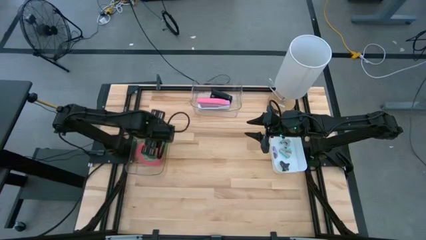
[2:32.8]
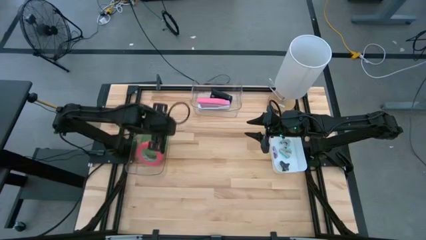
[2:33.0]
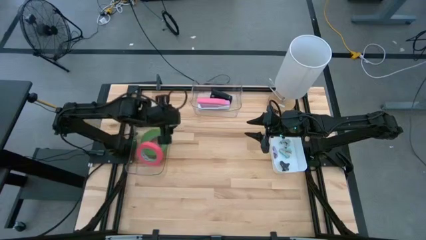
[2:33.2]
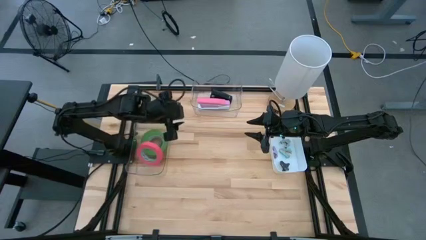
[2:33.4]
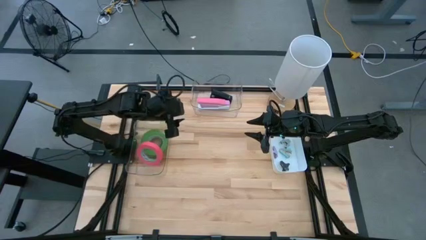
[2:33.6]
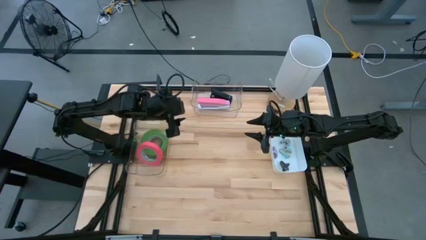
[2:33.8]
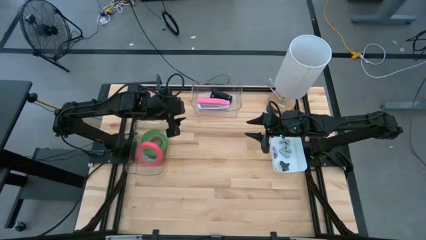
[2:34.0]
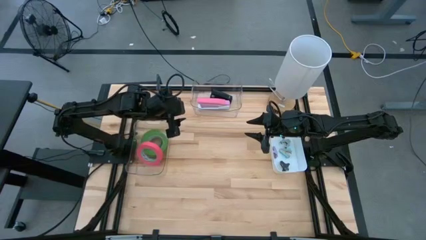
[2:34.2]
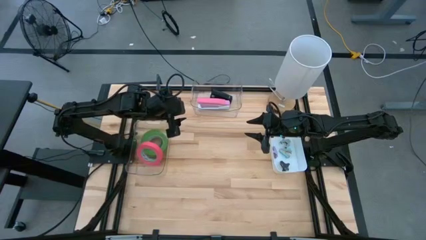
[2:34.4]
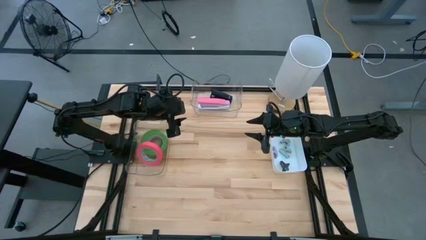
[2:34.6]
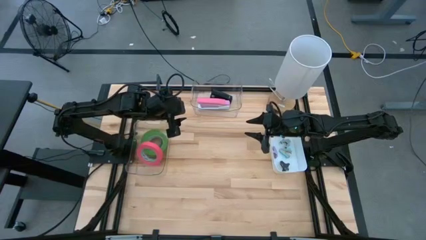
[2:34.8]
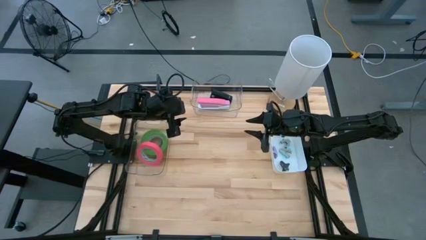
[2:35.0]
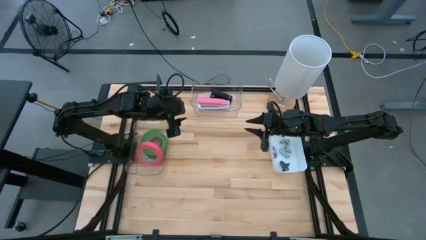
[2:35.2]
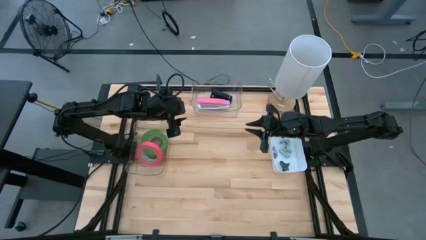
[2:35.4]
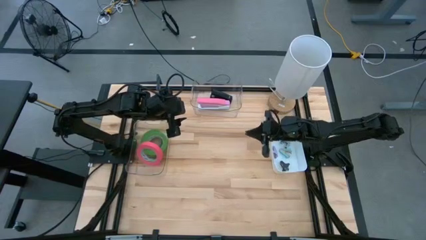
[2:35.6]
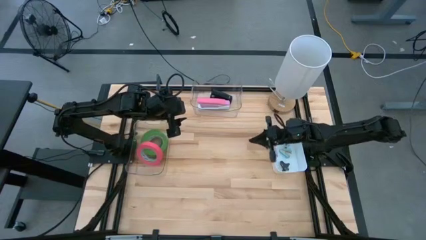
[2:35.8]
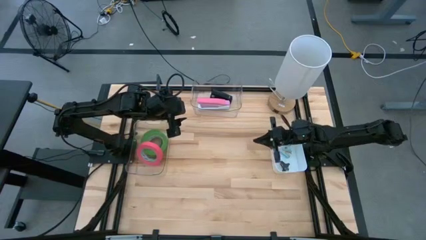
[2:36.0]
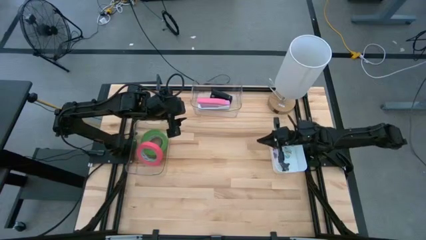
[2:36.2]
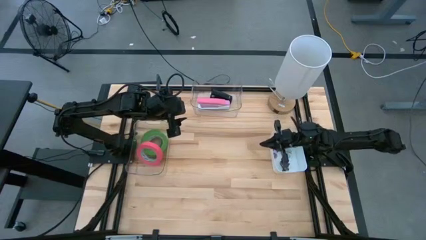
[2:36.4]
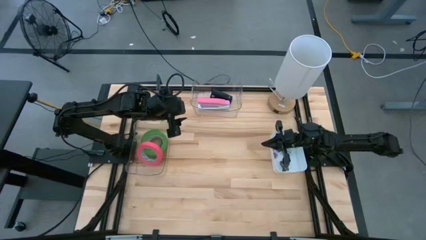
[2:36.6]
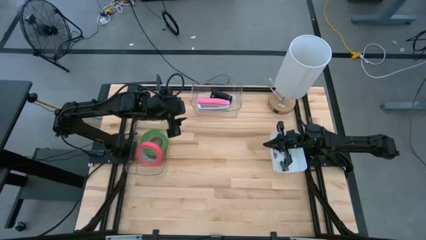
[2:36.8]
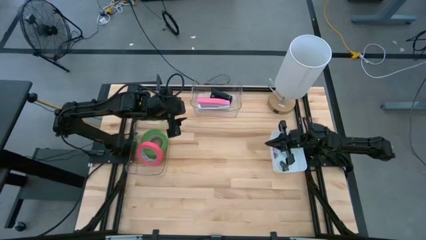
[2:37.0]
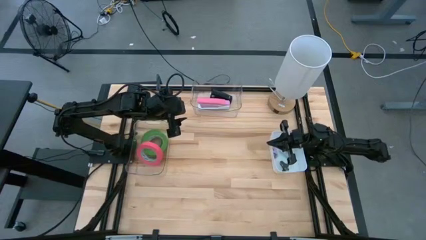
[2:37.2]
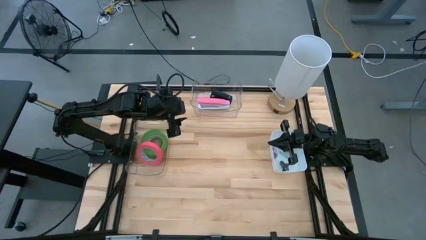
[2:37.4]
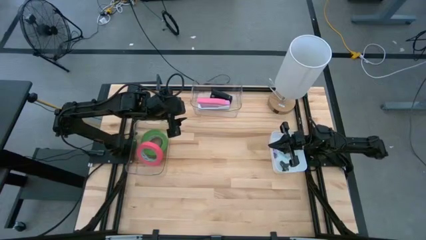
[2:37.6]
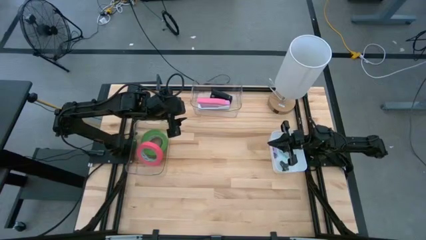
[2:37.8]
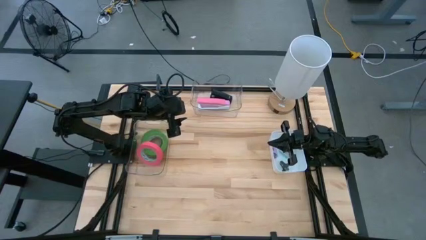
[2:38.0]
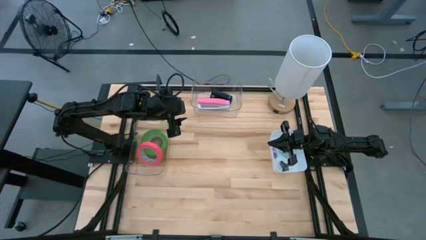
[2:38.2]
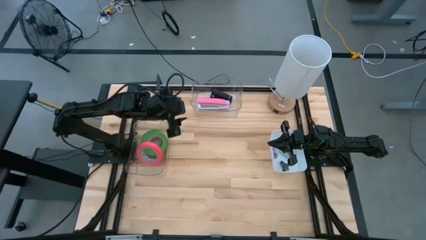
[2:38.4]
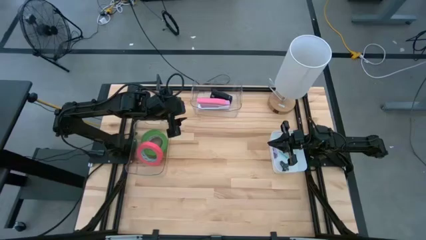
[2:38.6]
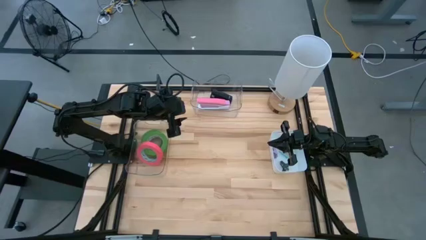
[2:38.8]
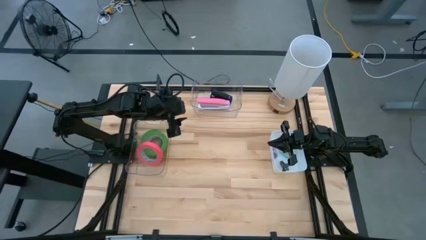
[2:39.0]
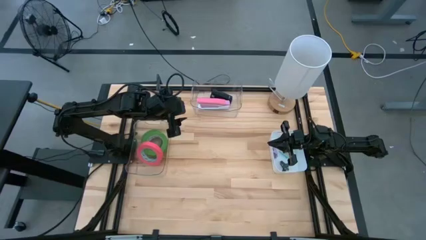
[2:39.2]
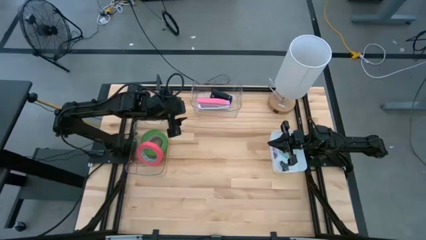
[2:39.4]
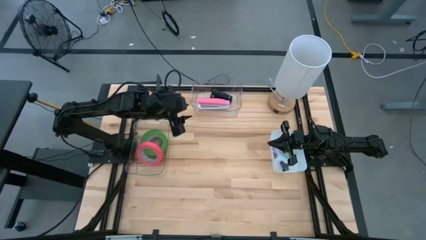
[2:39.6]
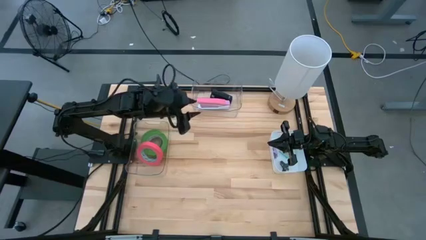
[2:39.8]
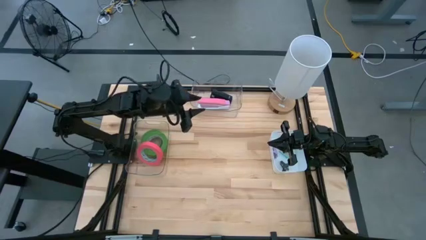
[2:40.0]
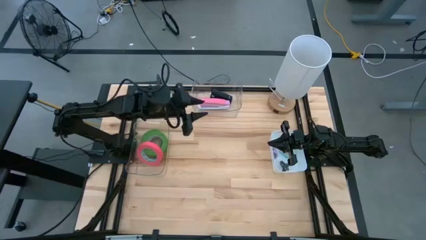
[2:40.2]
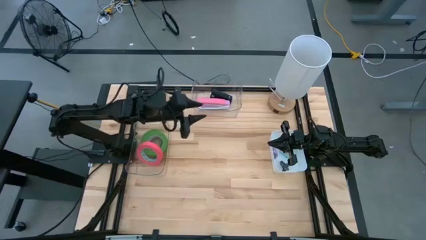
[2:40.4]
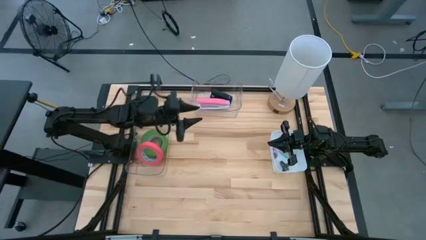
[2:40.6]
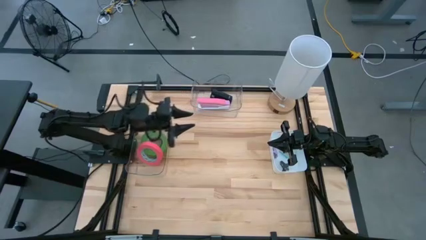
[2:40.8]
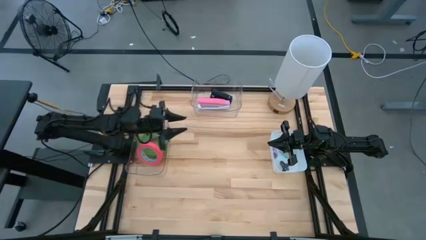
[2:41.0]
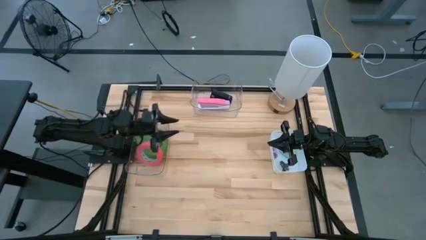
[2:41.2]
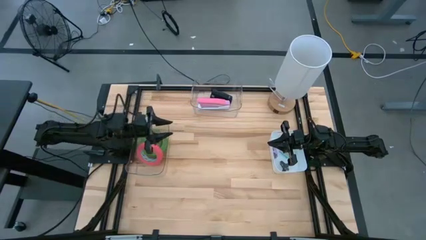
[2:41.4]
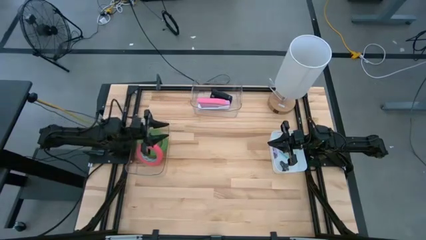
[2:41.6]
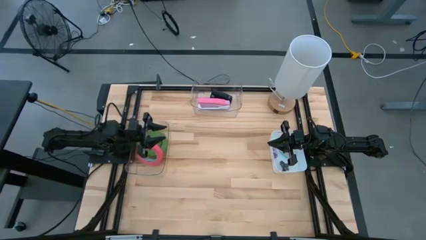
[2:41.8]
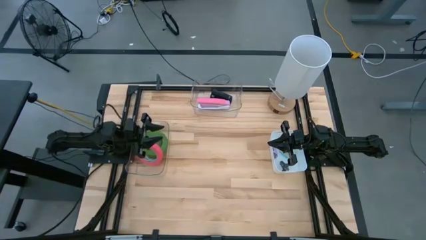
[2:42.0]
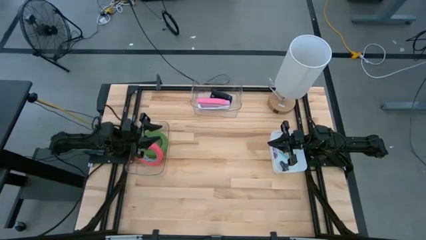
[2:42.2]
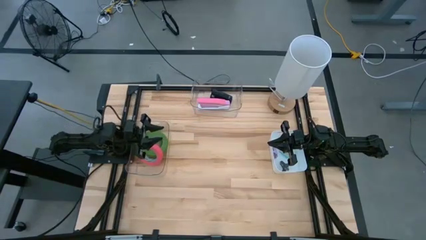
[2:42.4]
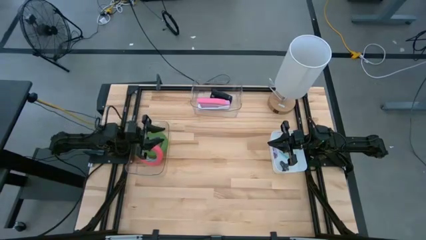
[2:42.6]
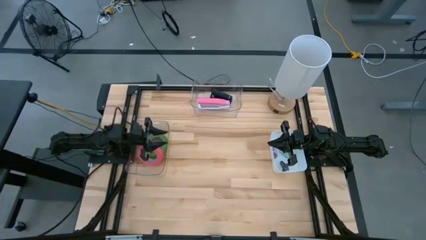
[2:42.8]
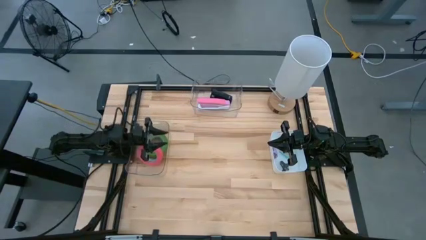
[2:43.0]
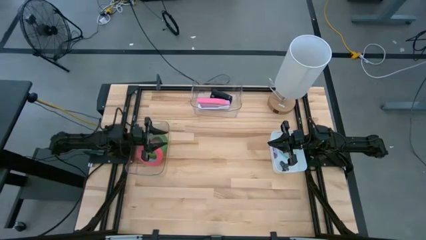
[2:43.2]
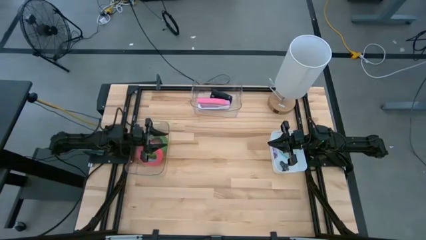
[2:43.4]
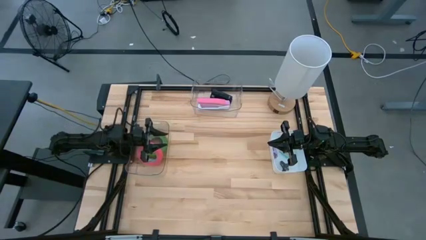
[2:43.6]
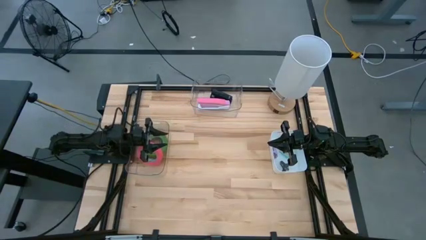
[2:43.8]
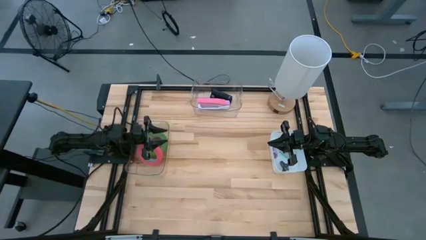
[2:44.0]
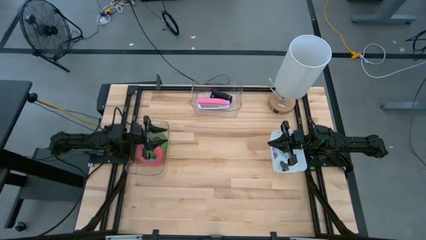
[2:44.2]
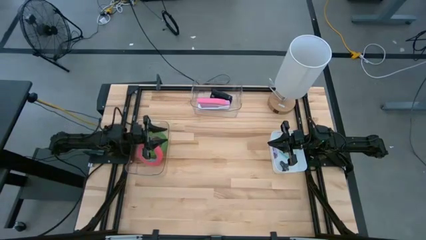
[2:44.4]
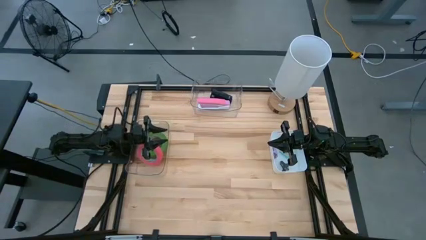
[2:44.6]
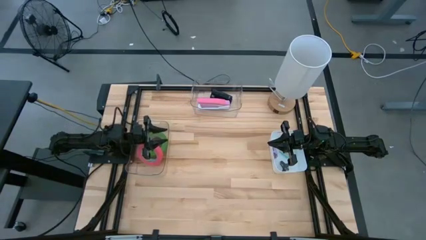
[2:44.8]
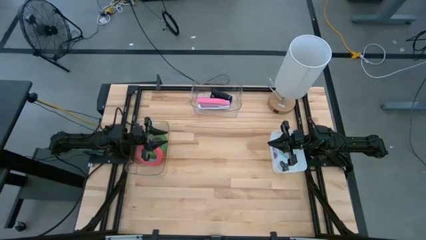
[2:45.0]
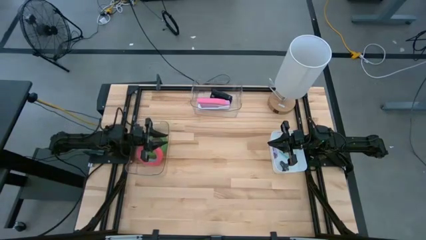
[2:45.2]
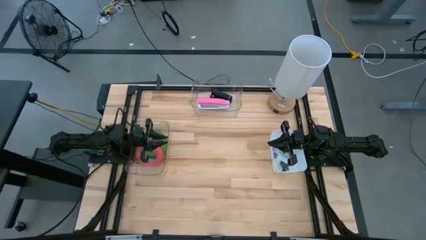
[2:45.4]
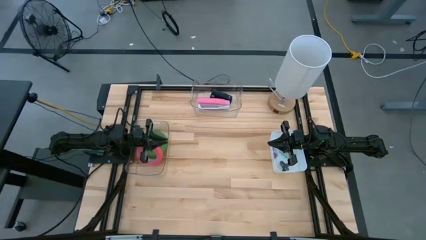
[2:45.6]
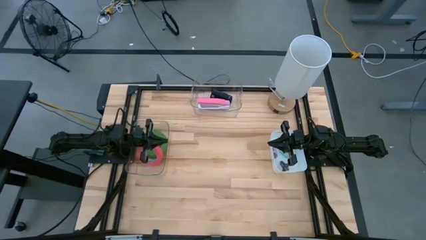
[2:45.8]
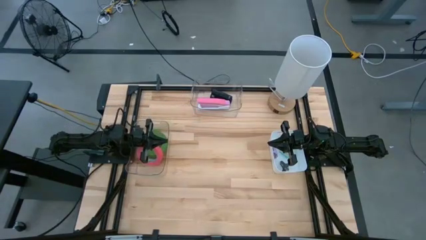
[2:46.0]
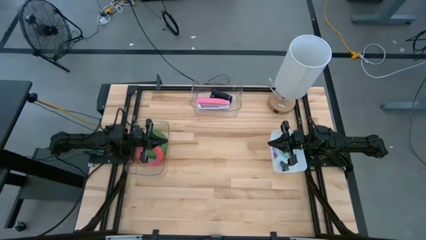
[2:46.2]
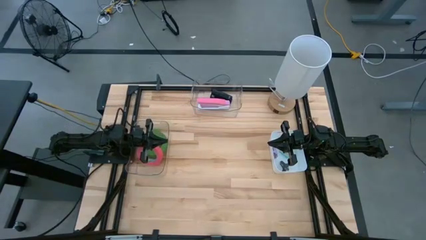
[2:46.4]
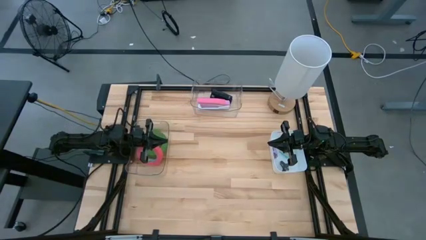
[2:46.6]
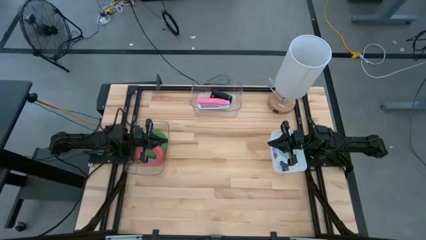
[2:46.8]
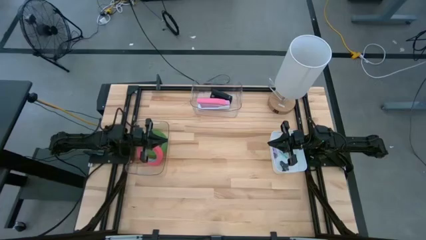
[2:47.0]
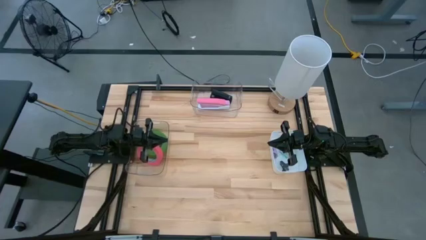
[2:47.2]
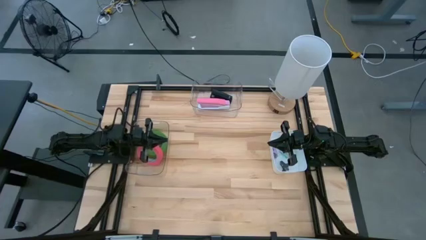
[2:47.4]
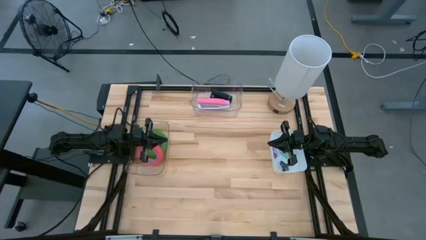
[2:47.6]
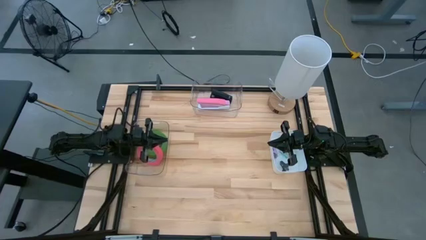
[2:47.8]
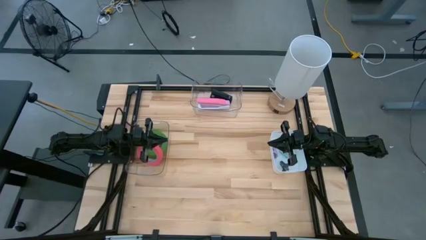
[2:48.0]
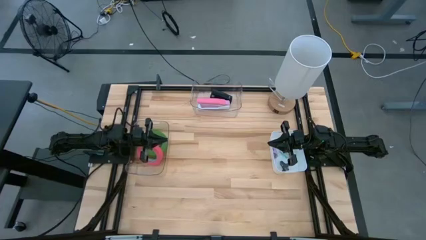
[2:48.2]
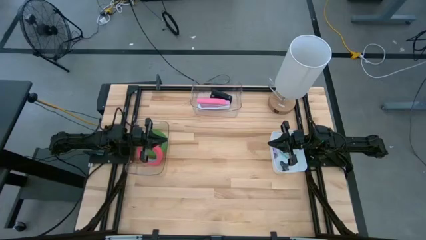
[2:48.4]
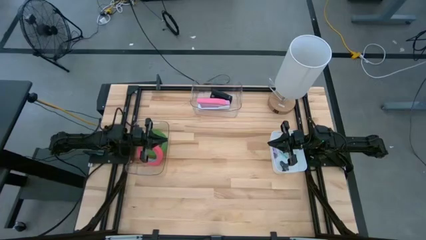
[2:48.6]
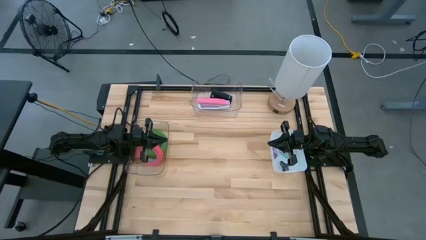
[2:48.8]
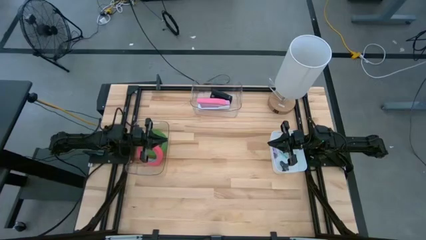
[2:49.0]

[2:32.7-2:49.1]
Task: Pick and place Stapler, Stapler remover, tape
Return to Home Position

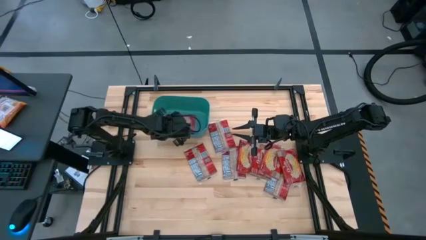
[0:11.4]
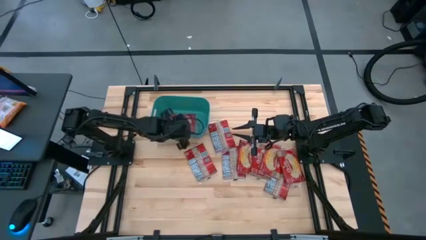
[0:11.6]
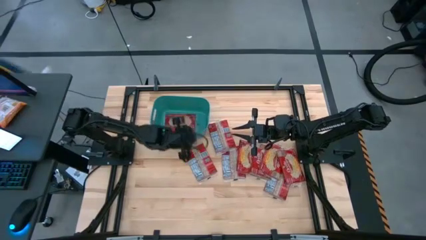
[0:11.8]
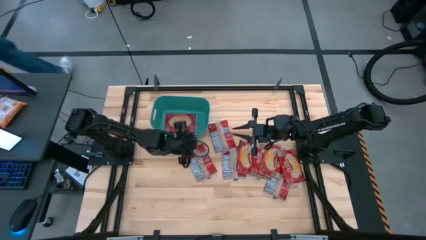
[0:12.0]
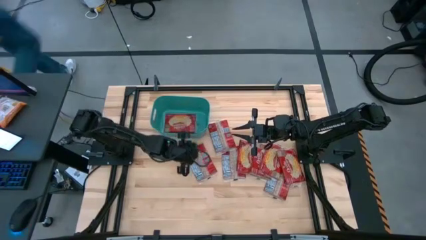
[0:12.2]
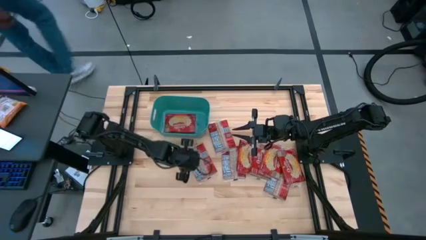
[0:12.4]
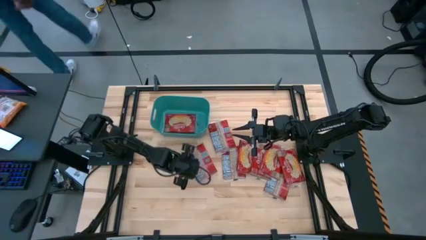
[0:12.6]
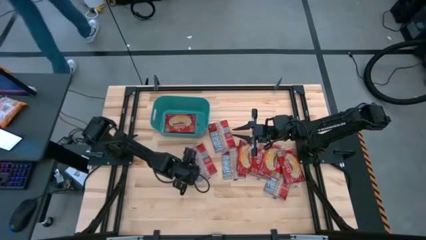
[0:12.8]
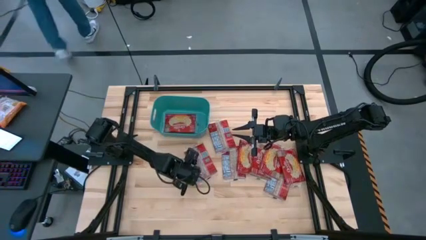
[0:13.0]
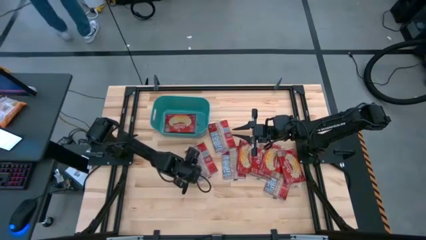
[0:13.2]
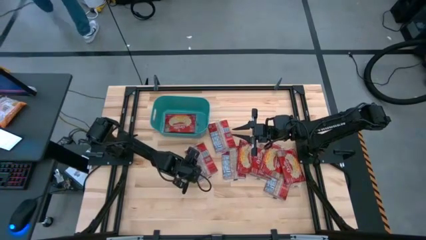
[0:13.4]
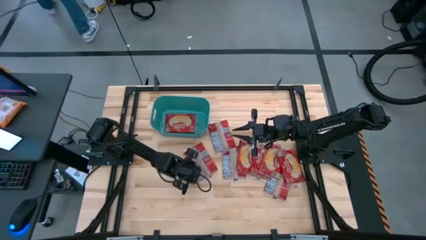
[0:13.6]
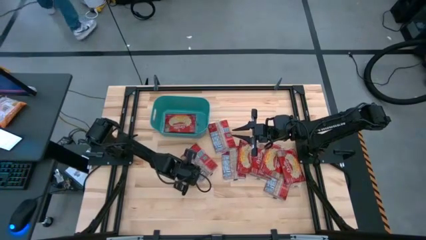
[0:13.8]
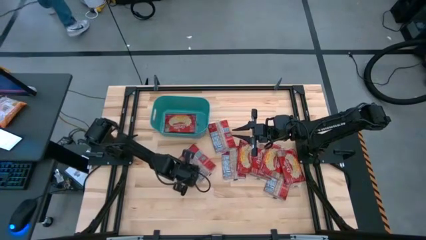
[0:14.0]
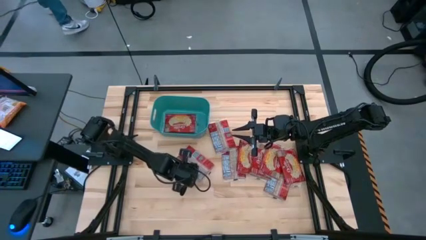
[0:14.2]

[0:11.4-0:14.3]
Task: Sort popcorn bags into baskets
Put the red popcorn pack into the green bin
